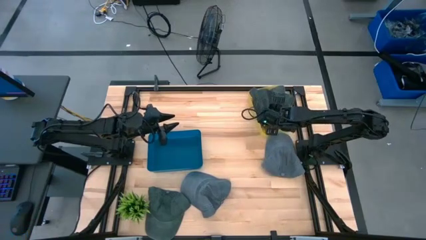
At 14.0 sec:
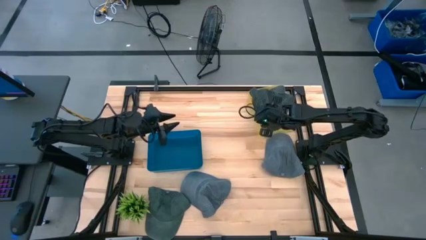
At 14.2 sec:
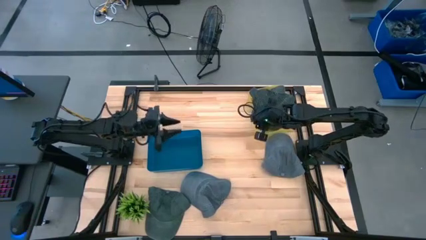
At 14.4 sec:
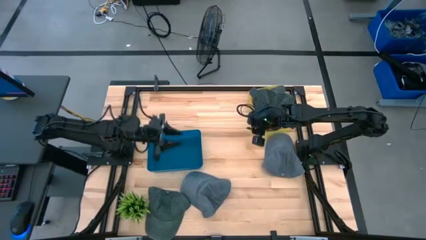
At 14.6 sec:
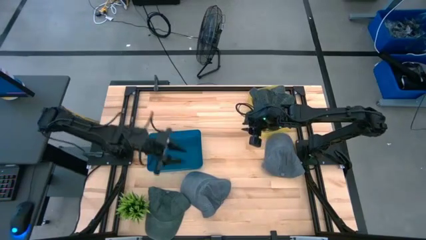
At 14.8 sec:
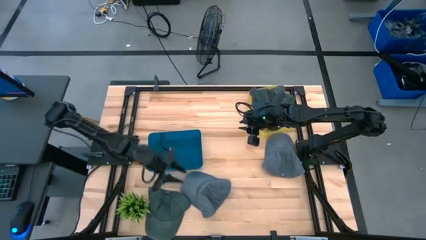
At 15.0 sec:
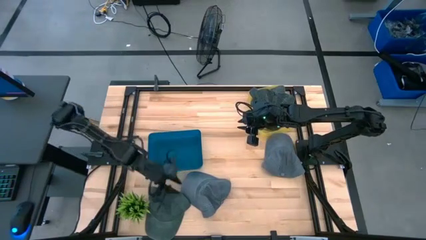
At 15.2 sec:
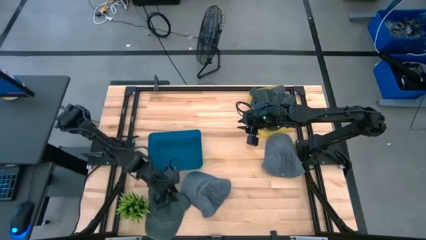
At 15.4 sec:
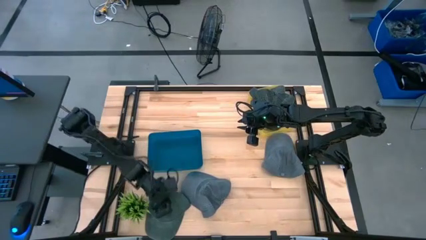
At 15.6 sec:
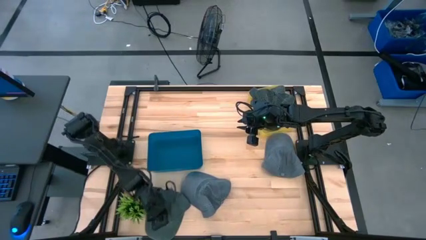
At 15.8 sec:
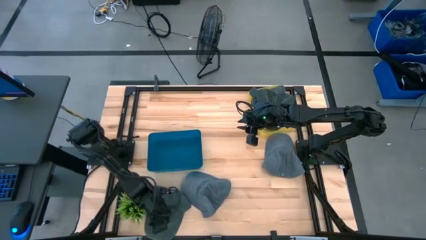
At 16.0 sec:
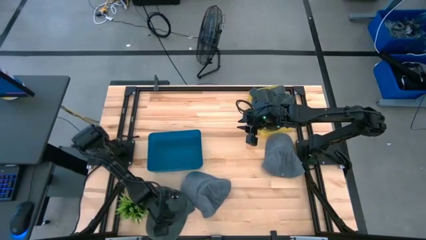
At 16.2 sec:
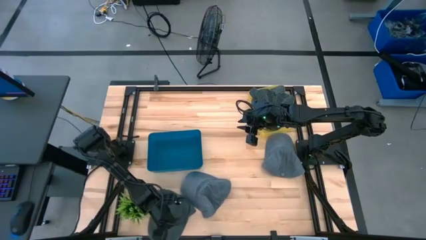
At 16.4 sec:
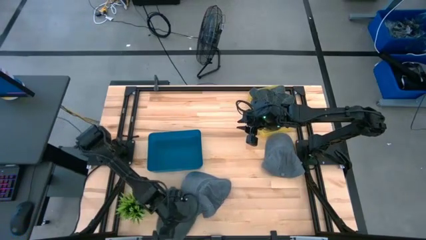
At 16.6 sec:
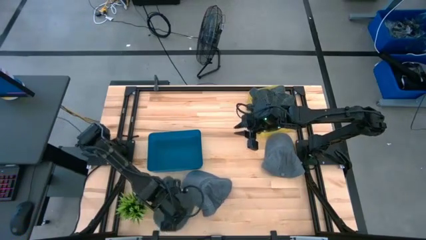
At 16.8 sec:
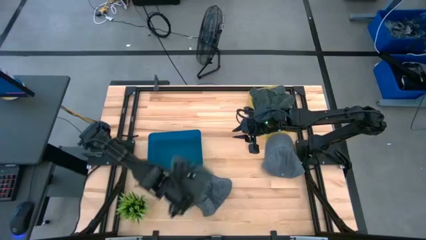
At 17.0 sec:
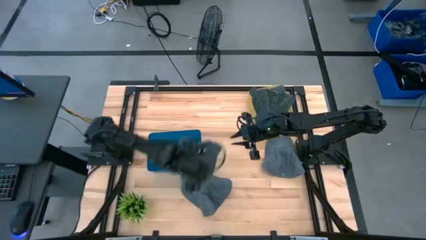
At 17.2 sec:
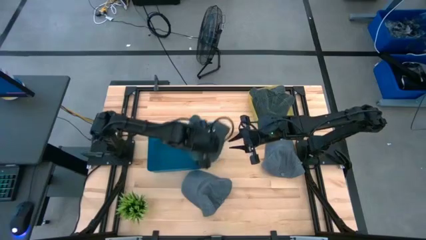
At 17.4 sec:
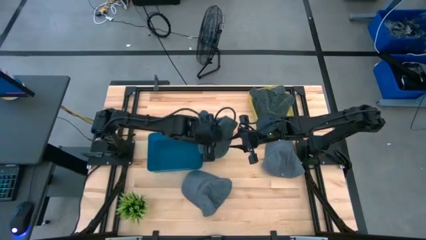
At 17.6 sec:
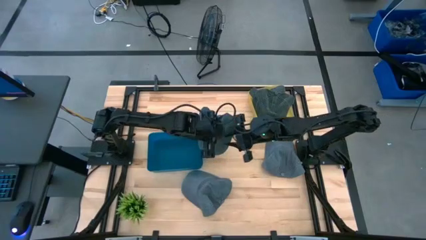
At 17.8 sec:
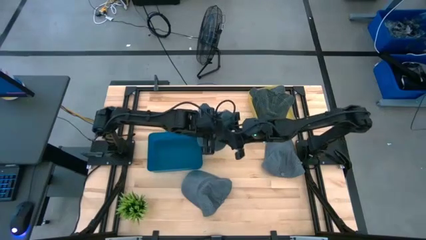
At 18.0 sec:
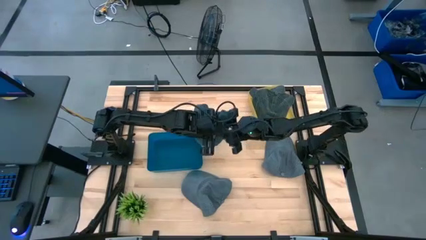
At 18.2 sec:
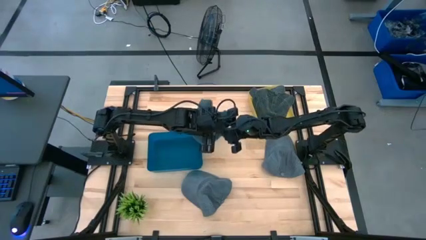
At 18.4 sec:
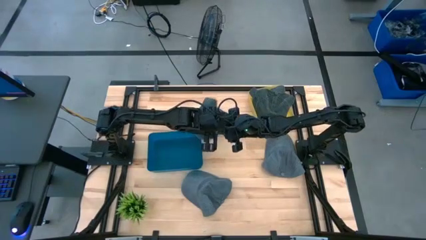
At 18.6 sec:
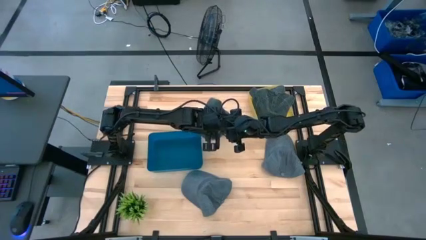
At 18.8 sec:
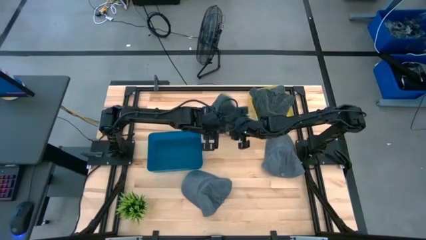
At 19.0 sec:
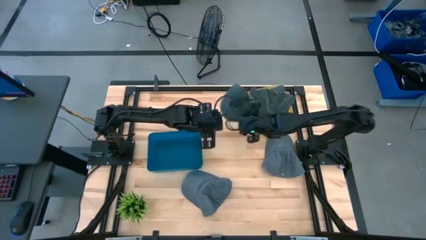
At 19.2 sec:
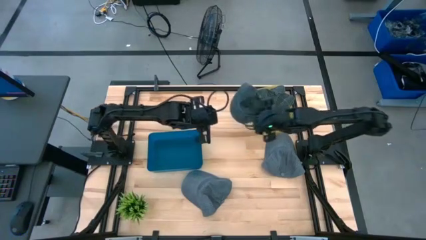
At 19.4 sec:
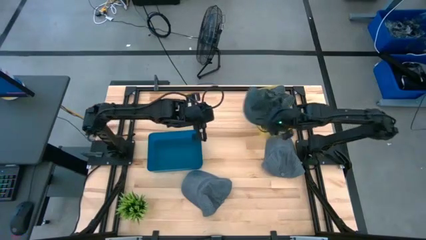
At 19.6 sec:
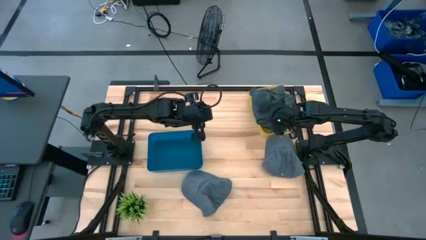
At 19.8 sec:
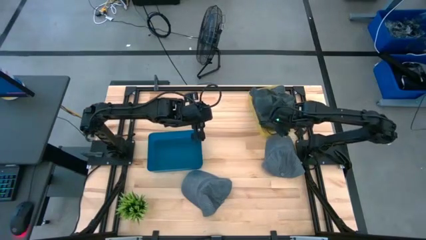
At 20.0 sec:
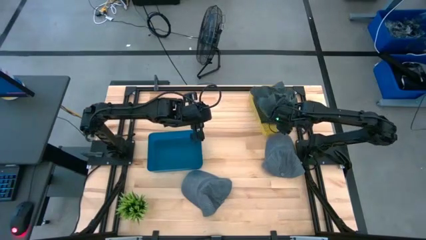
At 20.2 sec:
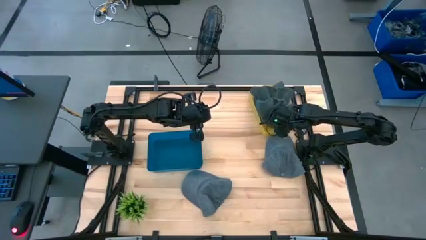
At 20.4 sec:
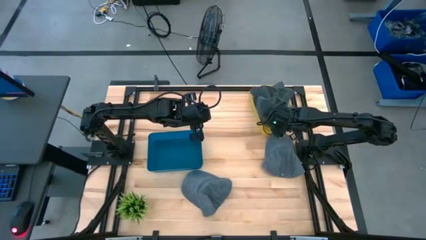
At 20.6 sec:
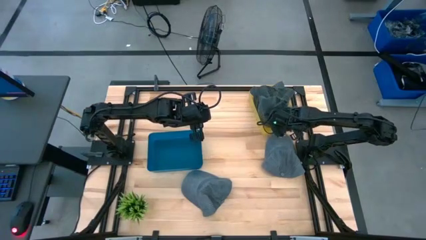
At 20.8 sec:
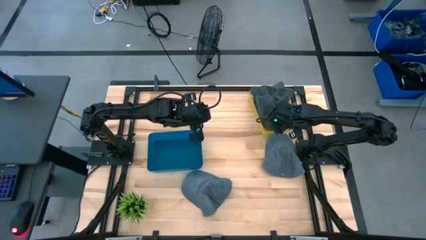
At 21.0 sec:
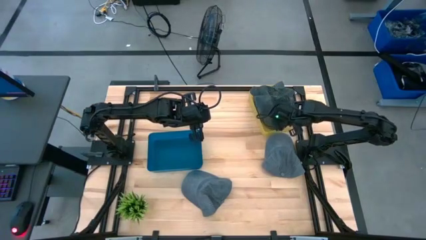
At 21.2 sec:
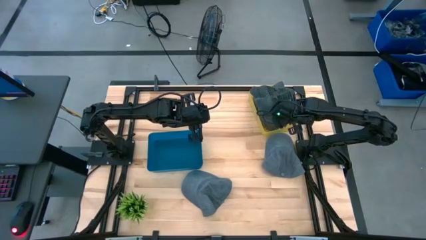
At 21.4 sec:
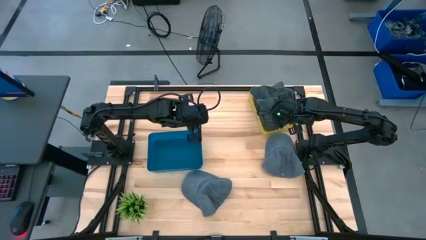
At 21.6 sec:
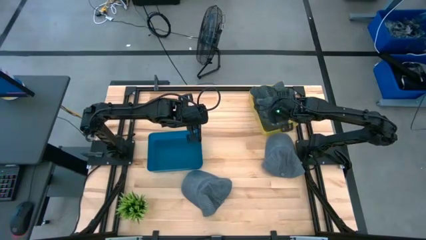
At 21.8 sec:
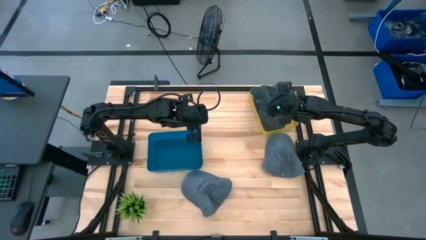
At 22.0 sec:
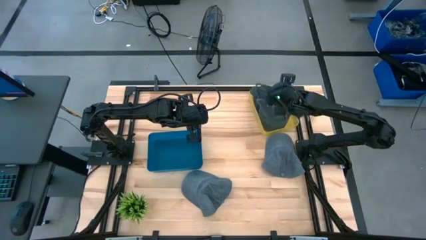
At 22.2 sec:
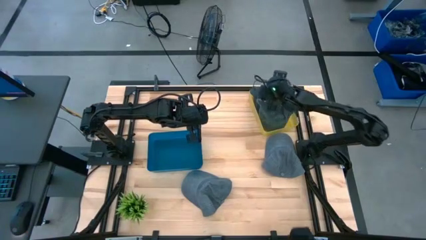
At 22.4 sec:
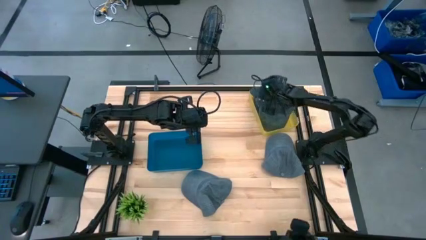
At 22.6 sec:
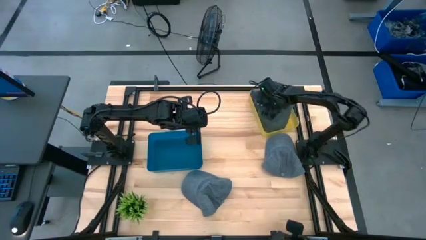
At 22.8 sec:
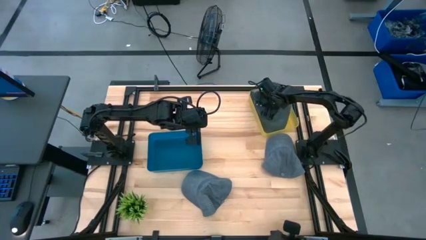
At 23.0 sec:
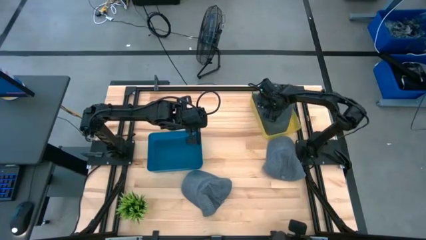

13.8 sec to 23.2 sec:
Task: Pick & Place hat
Put the green cap into the yellow bin

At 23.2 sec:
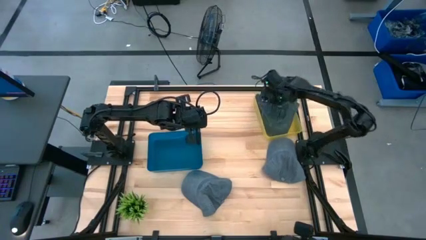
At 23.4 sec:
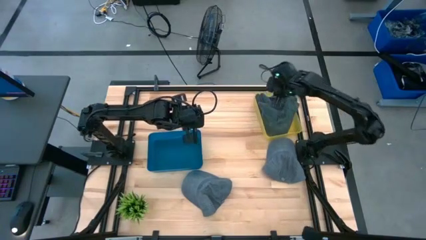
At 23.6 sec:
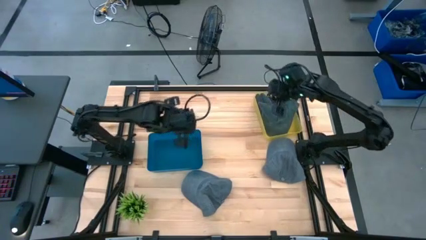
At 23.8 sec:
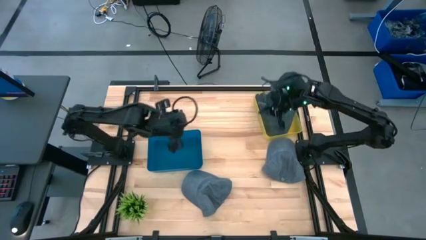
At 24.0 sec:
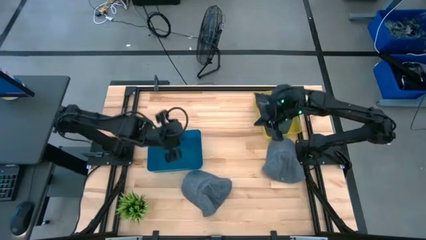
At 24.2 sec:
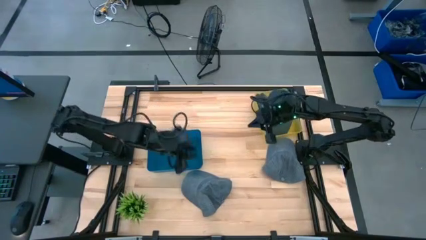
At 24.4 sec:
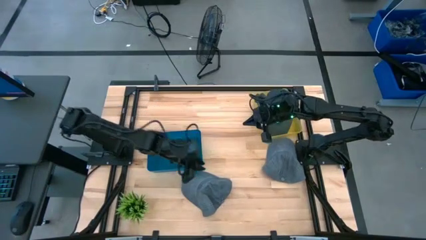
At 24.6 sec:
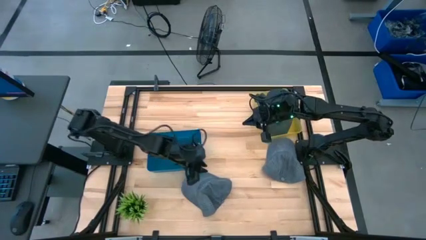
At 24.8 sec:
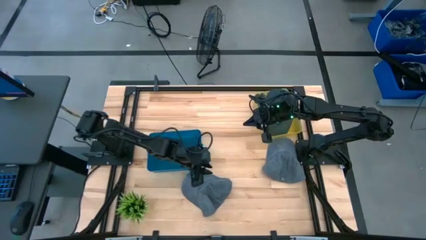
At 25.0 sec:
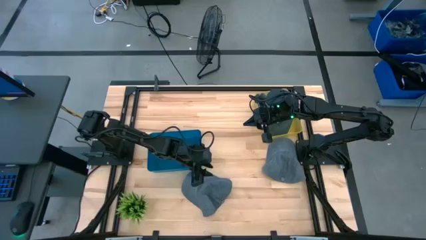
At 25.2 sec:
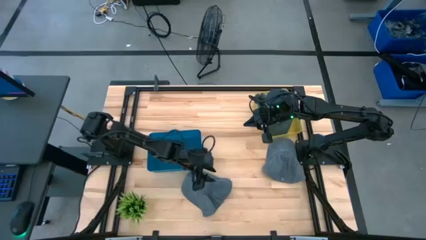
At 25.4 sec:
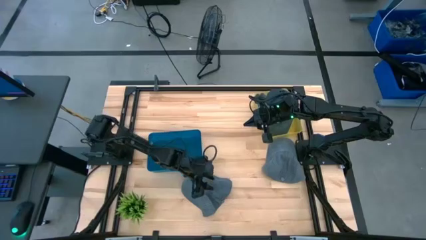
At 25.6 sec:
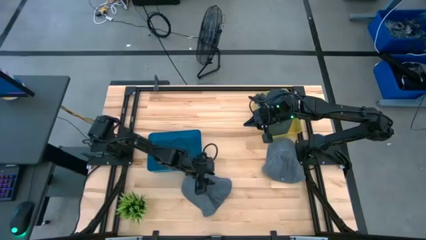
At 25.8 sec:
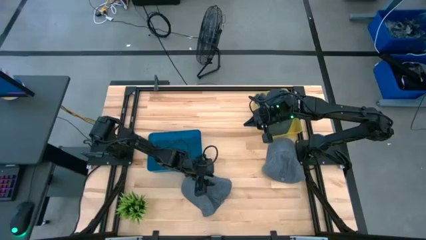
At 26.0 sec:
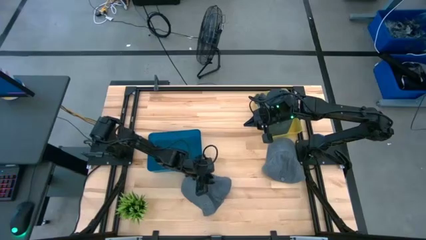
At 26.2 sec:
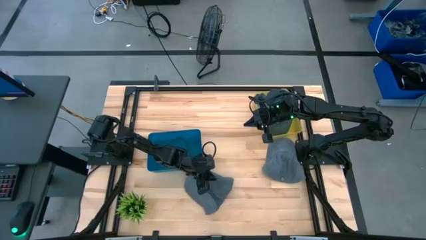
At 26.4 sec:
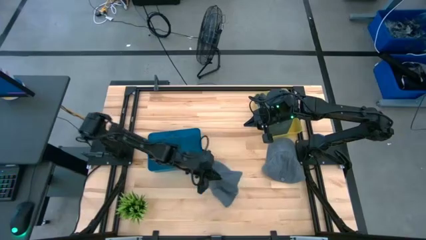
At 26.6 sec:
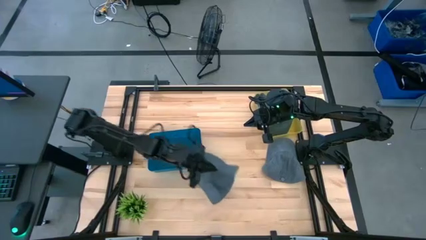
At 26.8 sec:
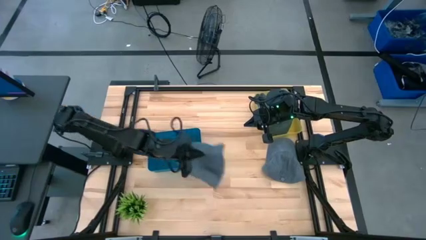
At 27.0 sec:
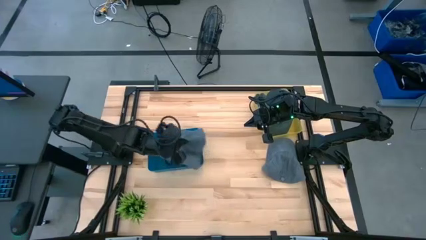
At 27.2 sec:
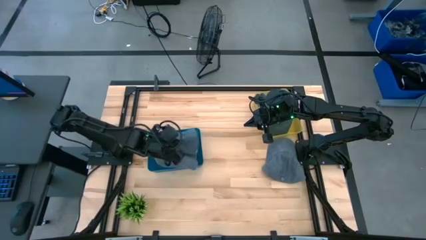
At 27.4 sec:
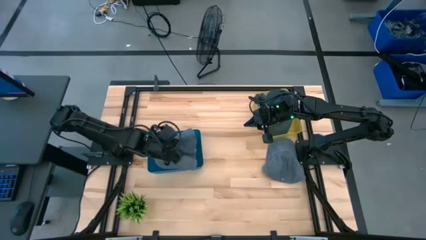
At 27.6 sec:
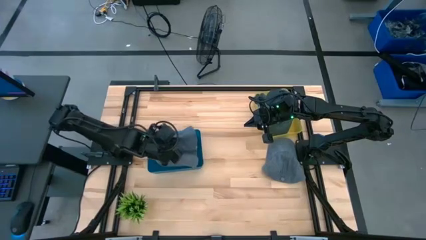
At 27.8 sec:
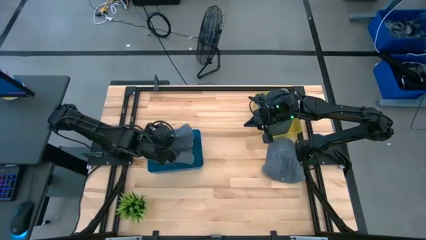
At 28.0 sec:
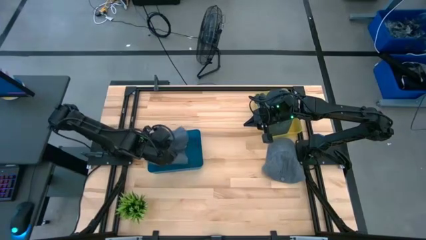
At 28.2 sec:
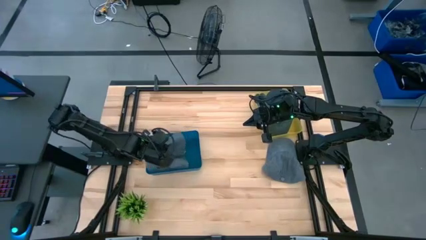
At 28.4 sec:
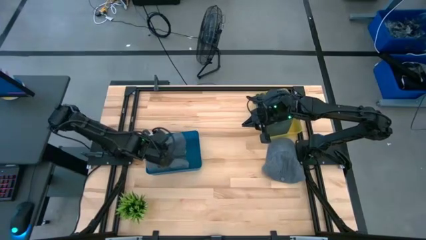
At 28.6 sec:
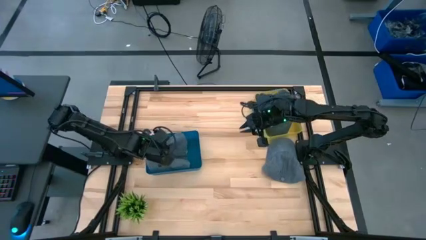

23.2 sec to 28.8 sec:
Put the left blue cap into the blue bin

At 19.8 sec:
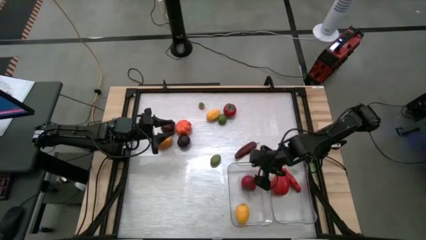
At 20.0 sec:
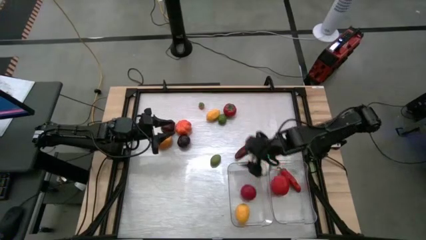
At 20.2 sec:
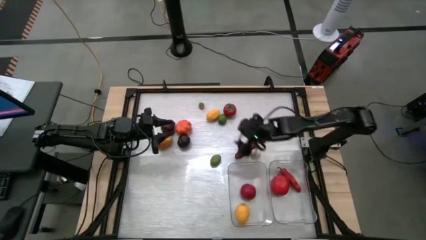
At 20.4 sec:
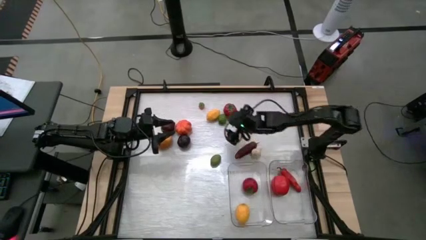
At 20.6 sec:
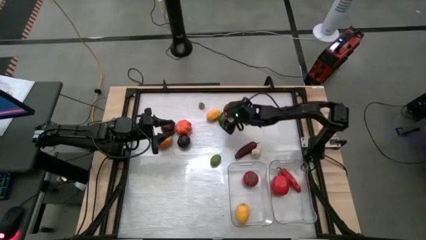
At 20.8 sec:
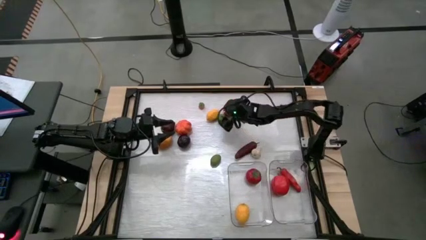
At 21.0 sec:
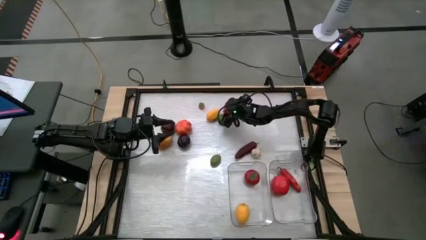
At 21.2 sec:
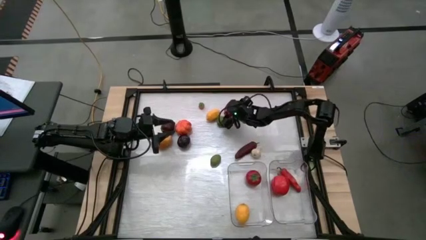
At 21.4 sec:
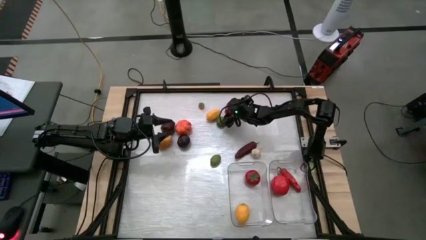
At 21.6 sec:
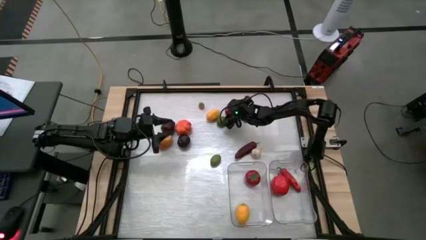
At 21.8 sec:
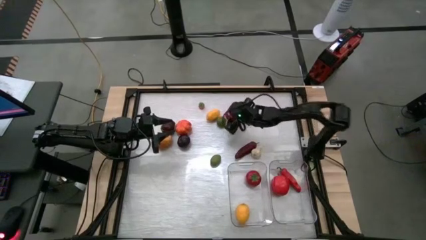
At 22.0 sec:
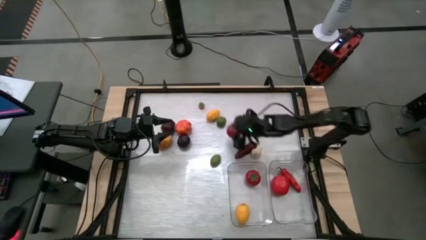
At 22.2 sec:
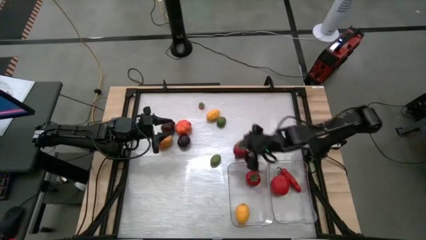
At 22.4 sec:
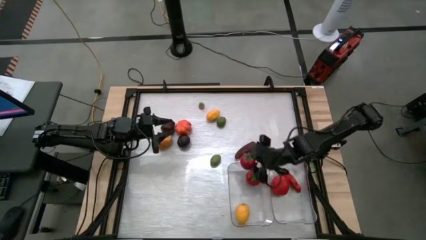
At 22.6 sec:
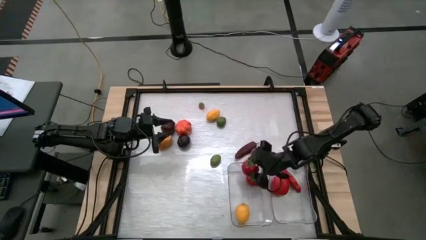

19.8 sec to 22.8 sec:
Task: Sort produce into baskets
Put the tomato into the left transparent bin
